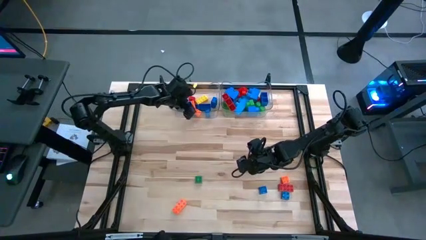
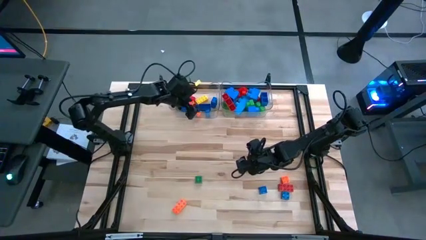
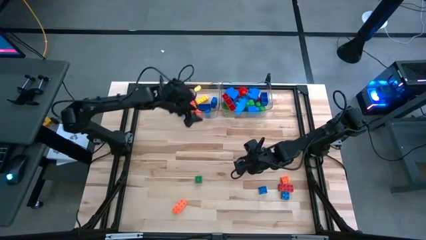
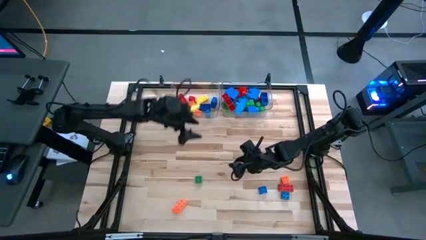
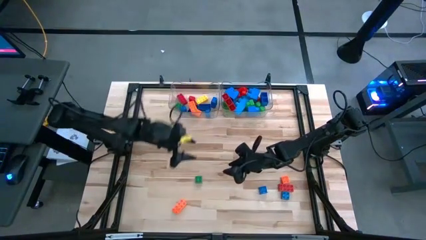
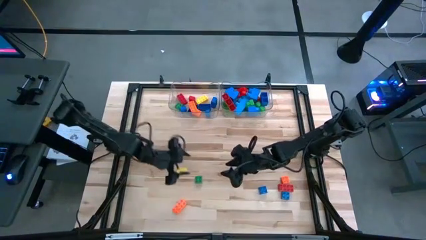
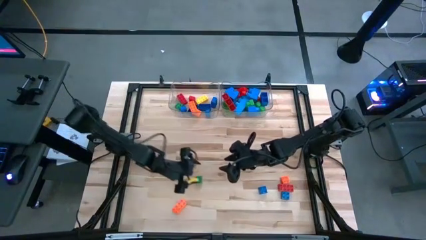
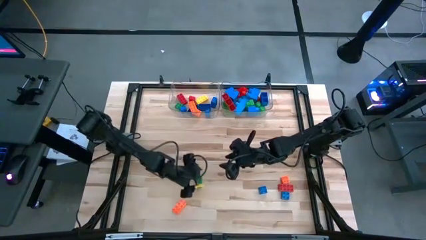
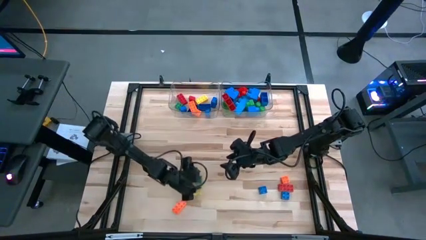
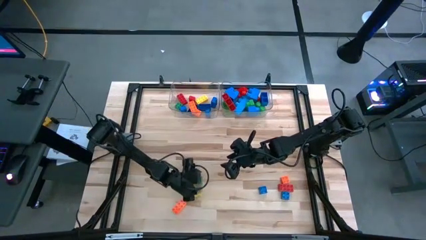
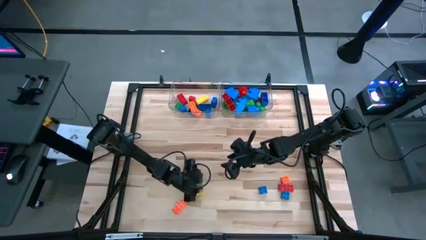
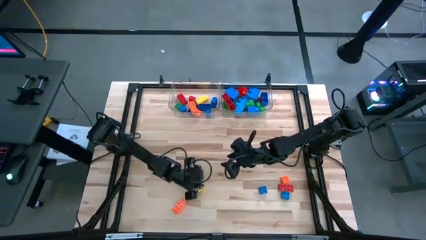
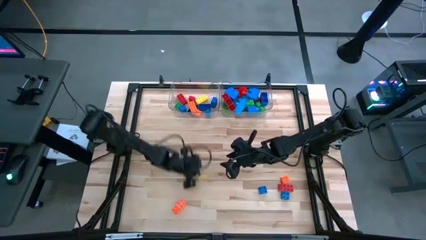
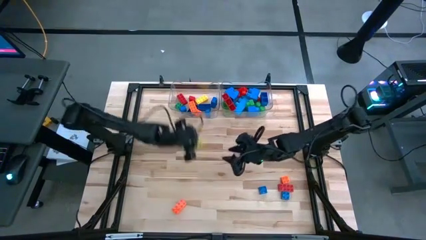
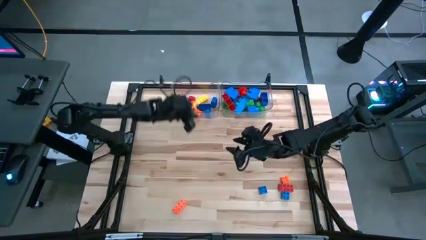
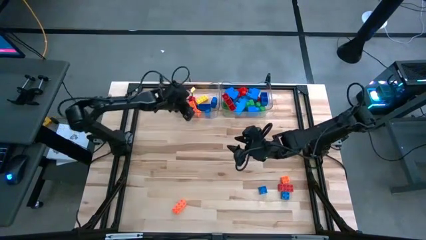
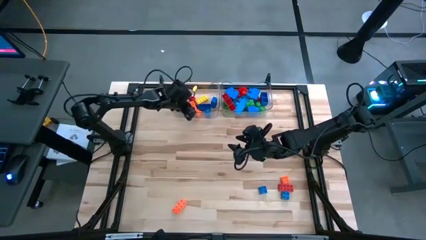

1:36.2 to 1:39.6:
Task: Sort blocks by size
Put the green lego piece into the left transparent bin

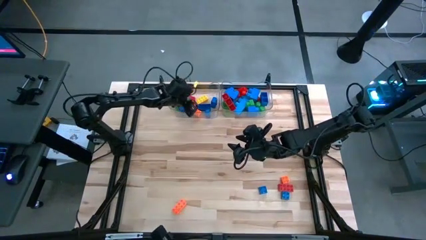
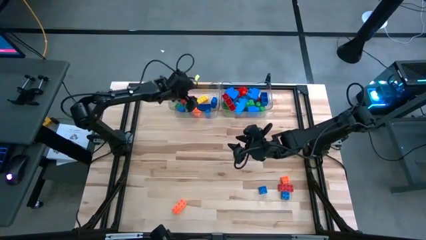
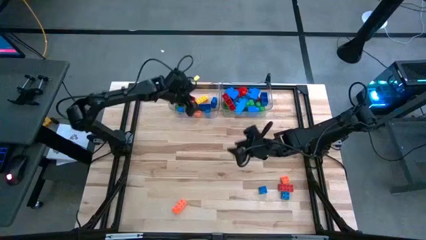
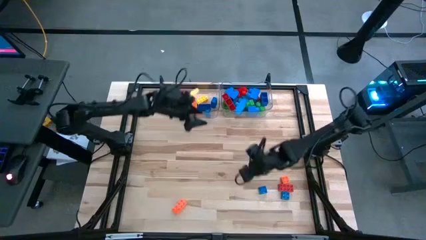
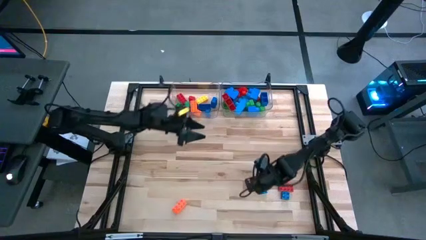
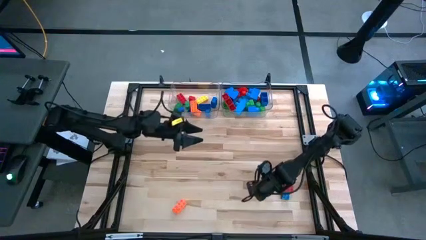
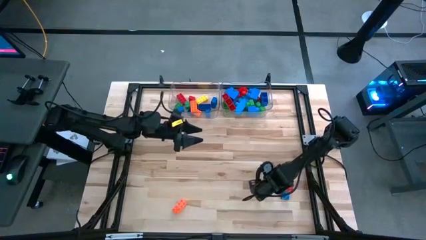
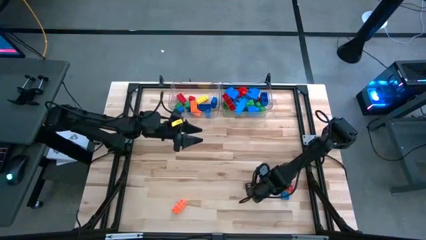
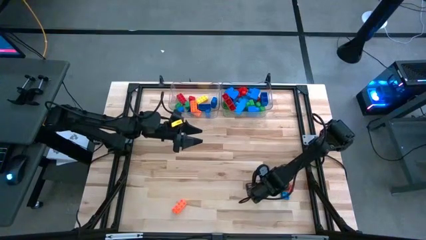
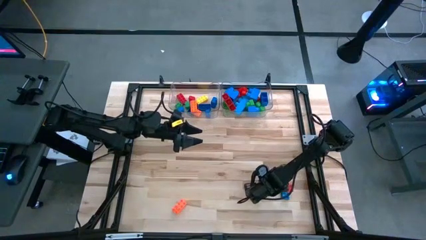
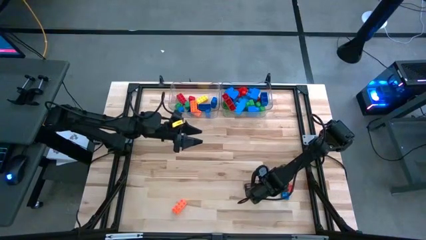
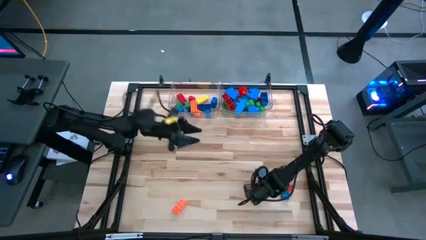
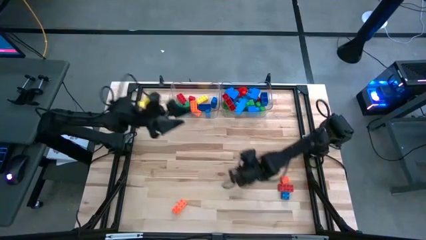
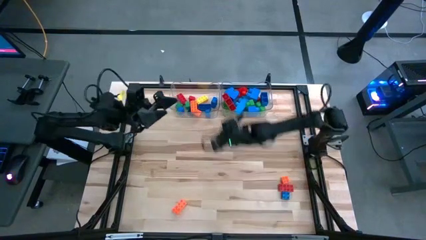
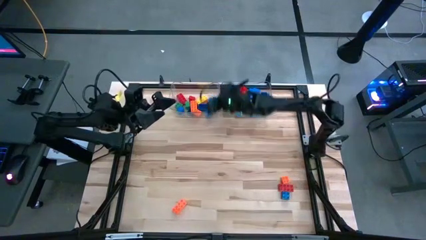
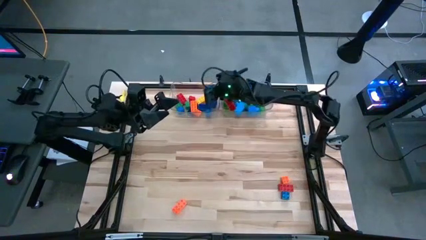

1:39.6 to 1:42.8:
Put the blue lego piece into the left transparent bin

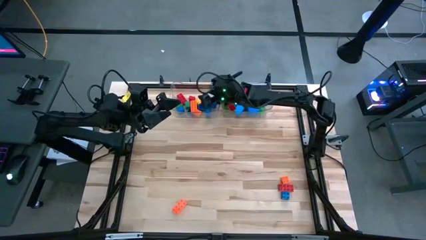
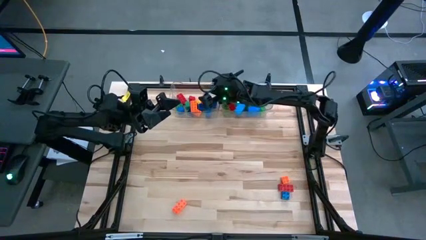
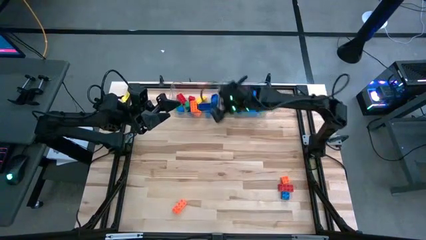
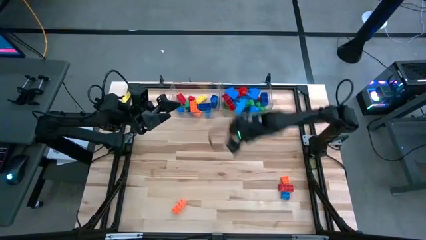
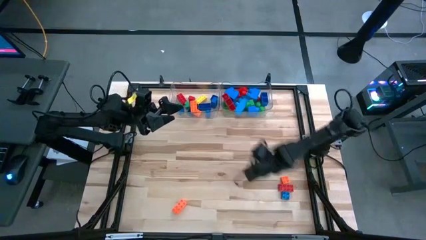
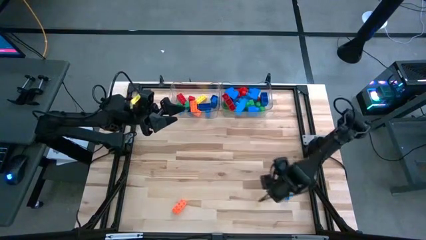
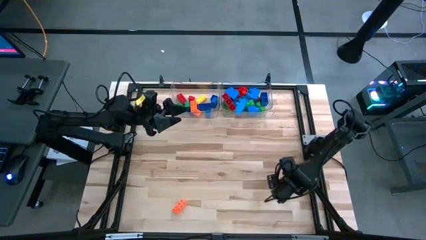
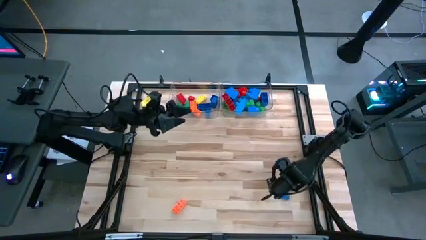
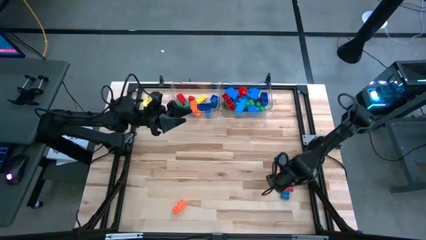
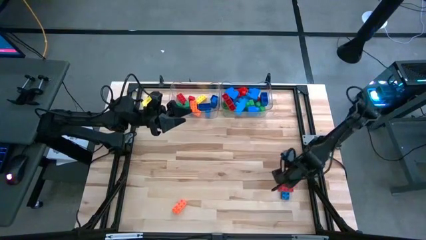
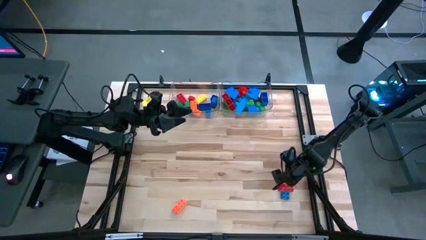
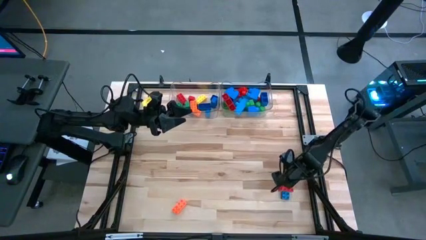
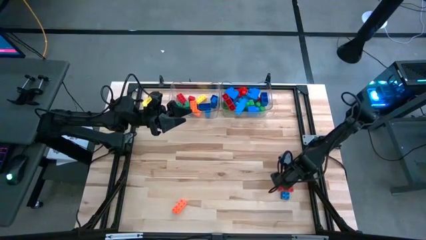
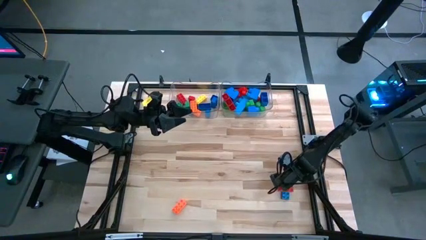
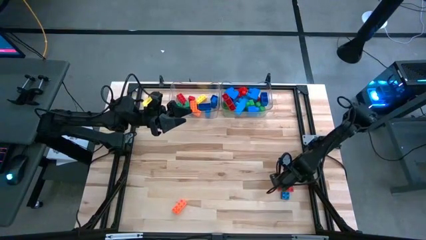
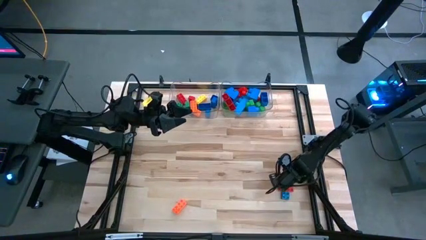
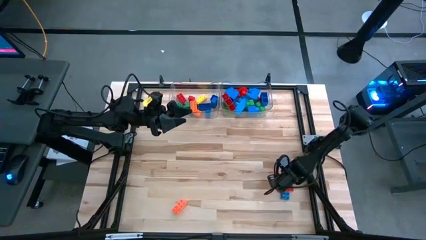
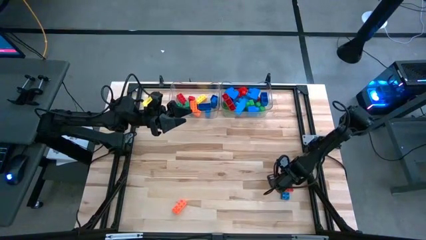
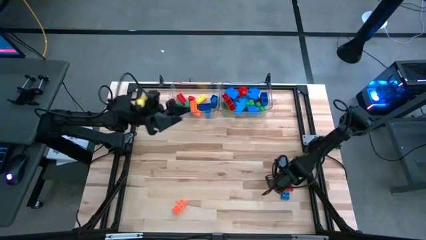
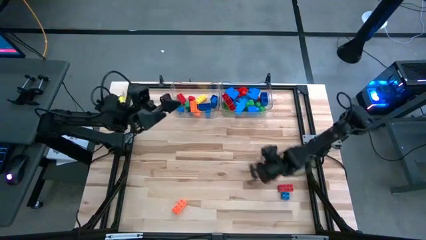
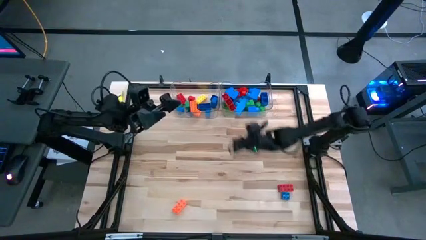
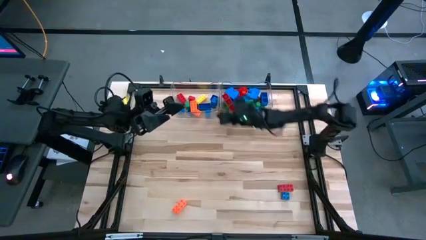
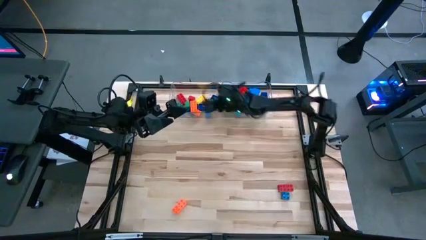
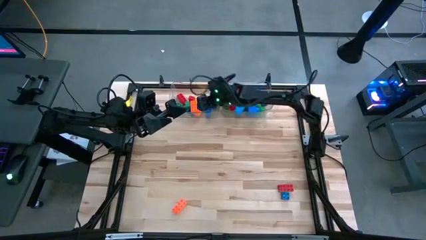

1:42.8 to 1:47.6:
Put the orange lego piece into the left transparent bin

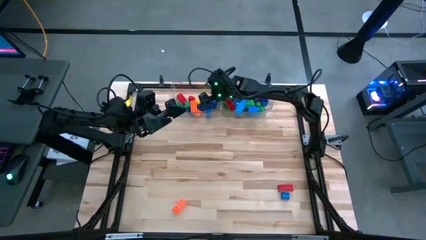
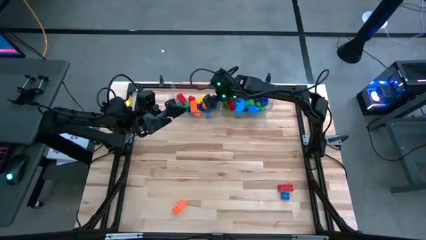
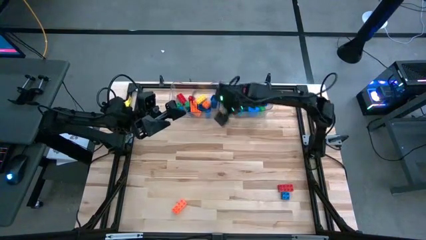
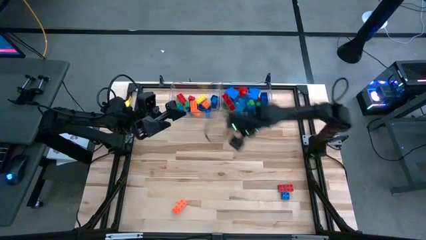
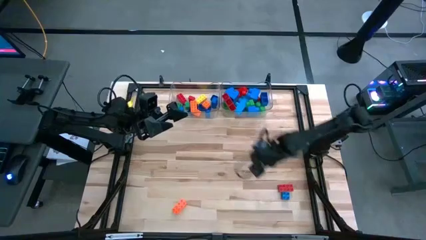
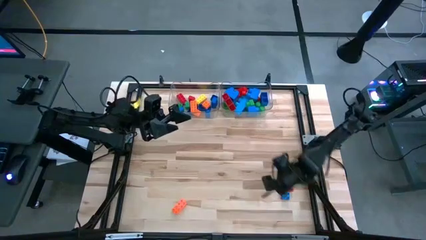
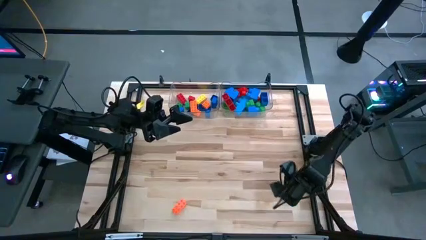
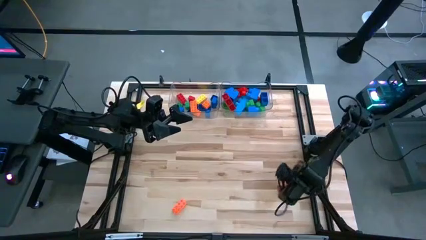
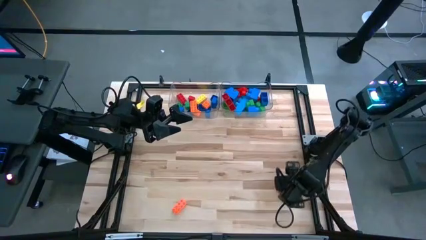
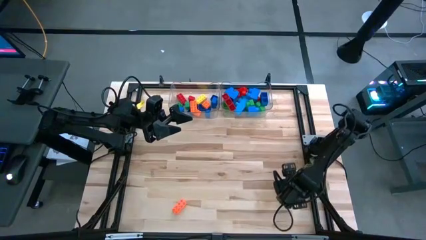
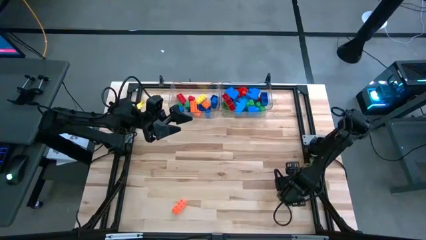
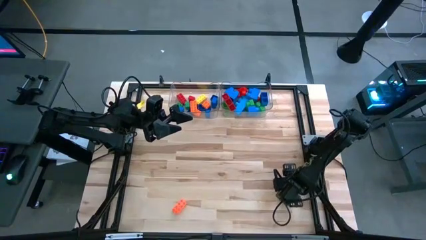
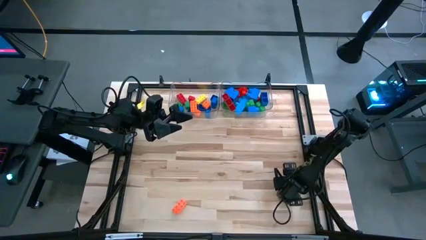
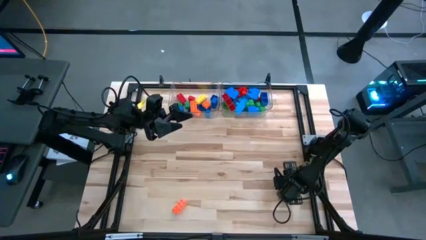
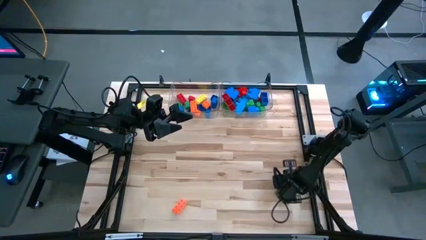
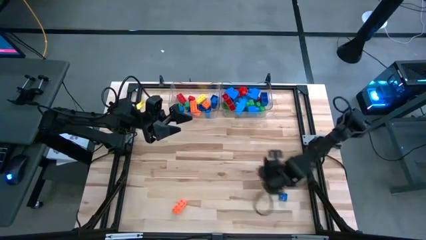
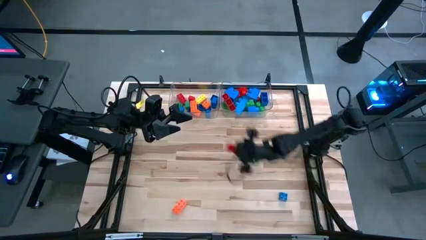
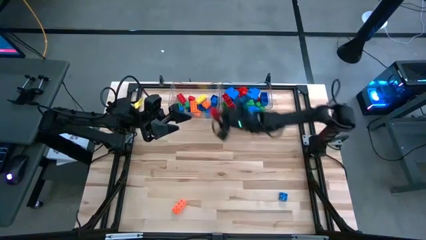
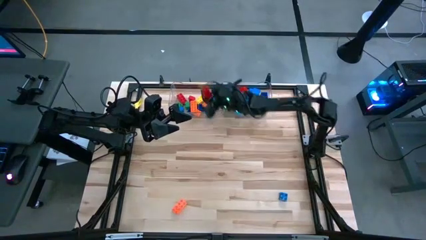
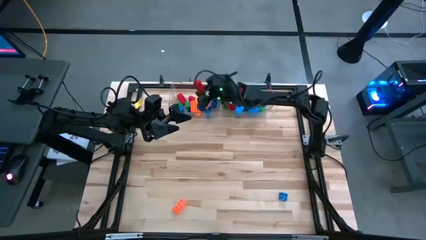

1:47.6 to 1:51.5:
Put the red lego piece into the left transparent bin

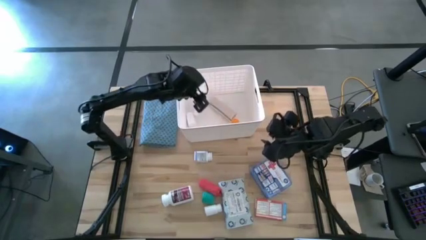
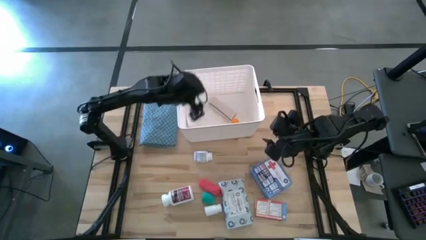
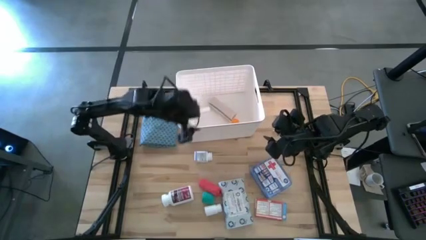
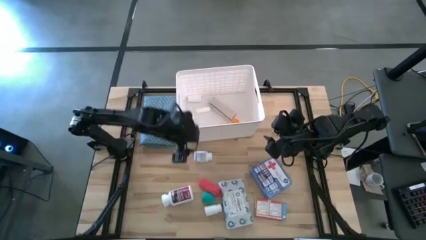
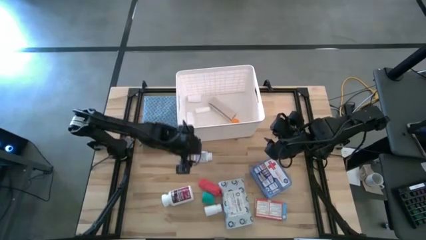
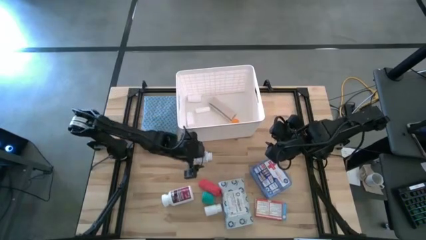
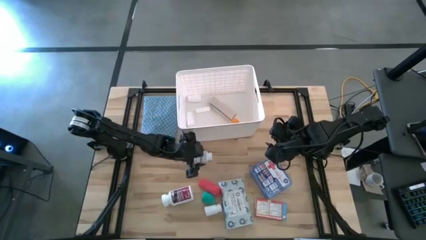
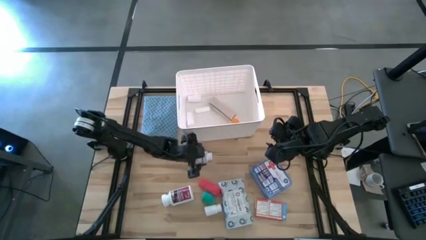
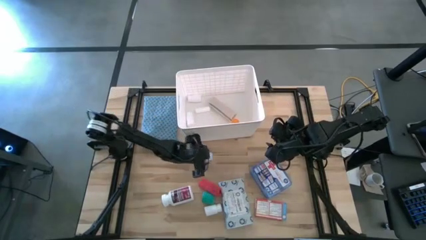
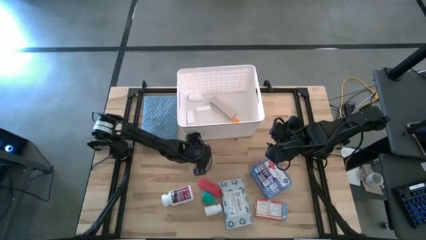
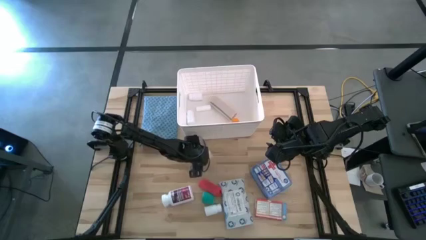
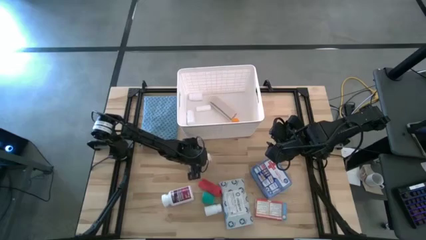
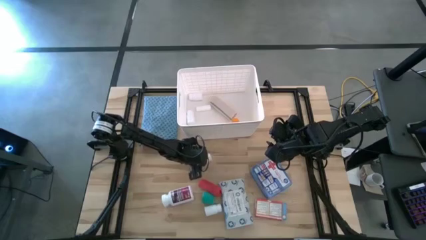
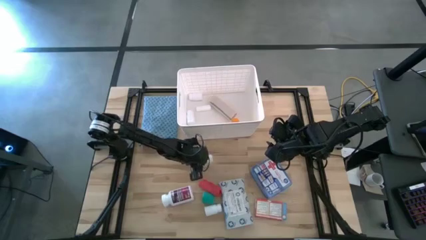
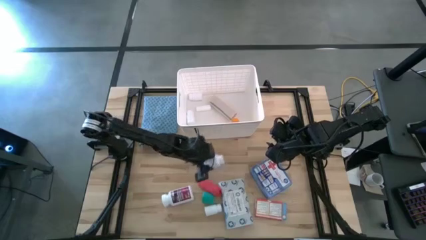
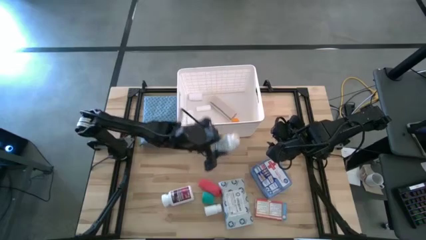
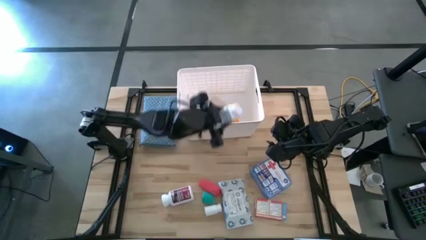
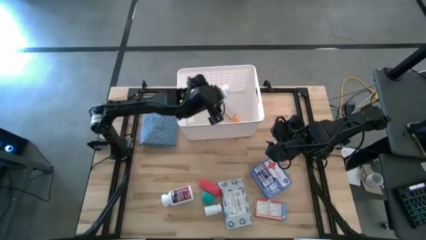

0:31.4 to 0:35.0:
Task: Pick & place medical supplies in basket/bin
Put the white and blue pill bottle into the white container
